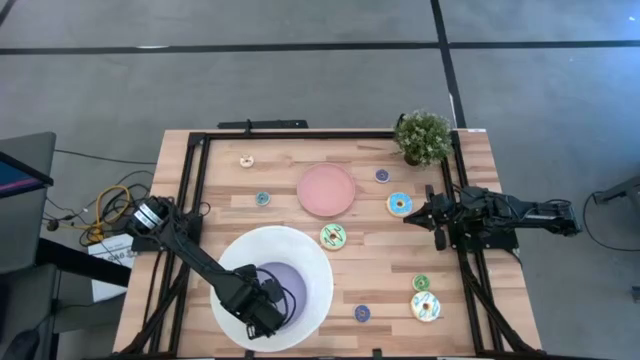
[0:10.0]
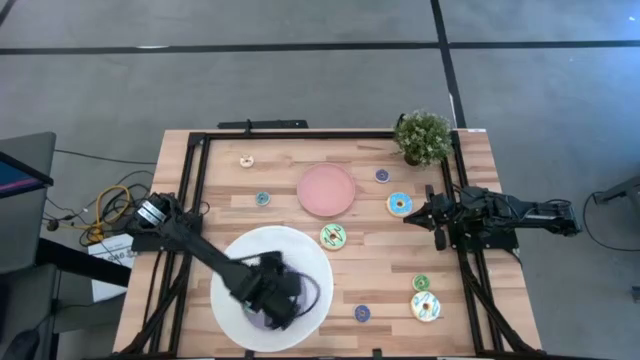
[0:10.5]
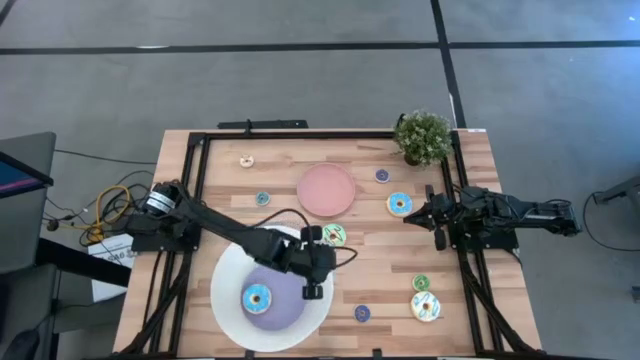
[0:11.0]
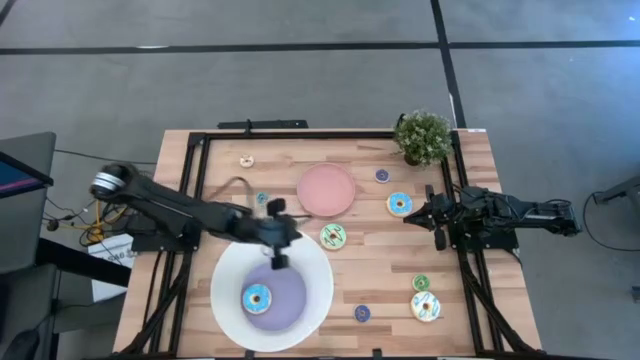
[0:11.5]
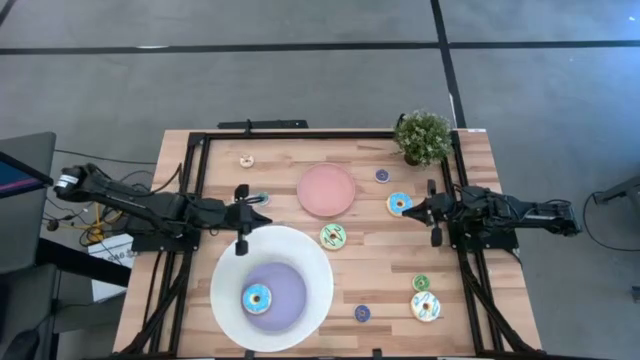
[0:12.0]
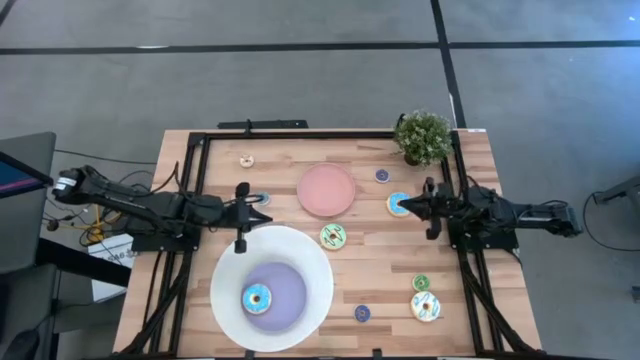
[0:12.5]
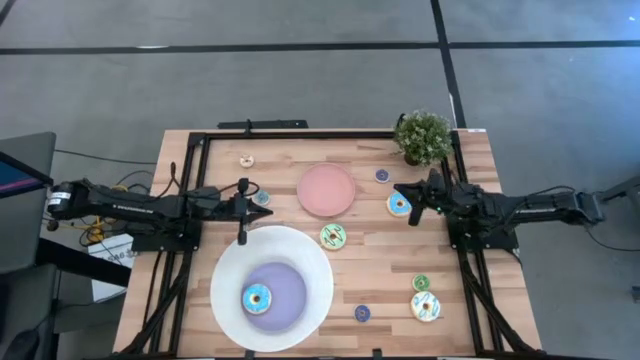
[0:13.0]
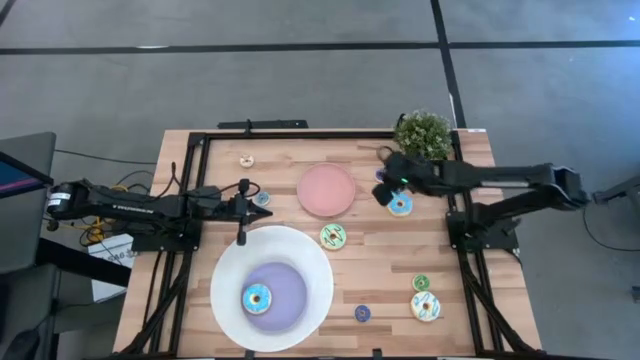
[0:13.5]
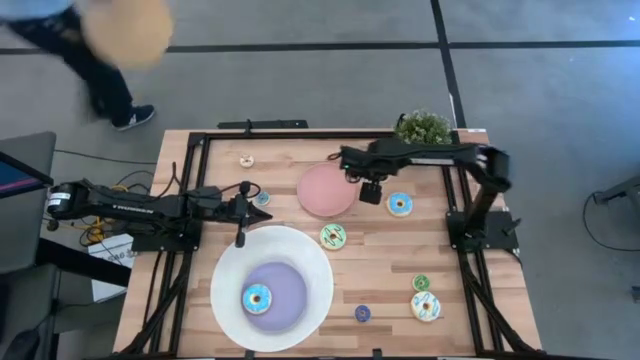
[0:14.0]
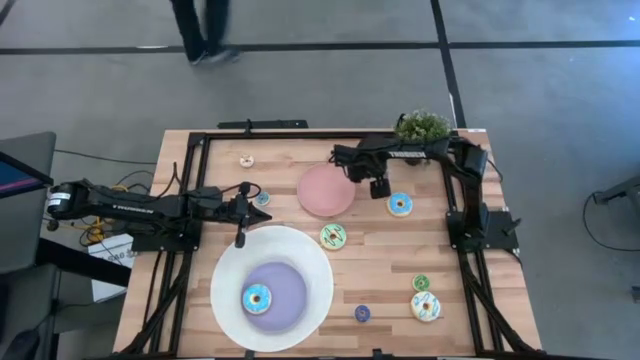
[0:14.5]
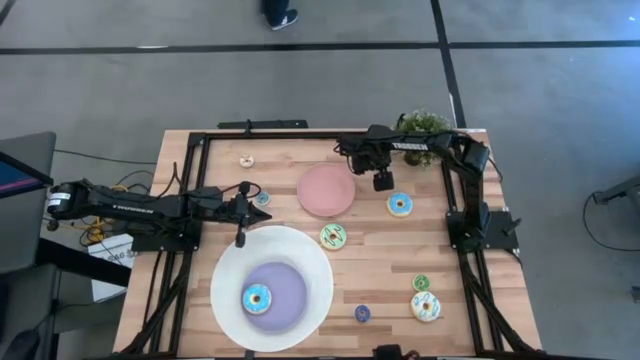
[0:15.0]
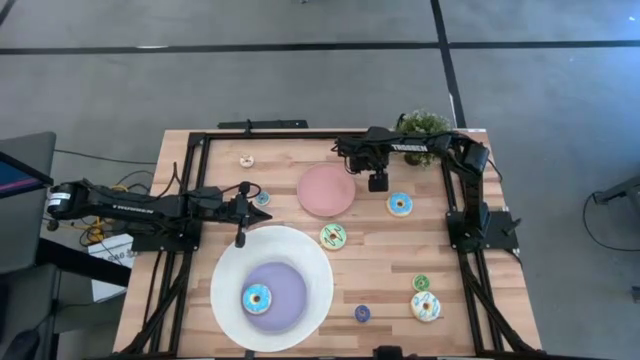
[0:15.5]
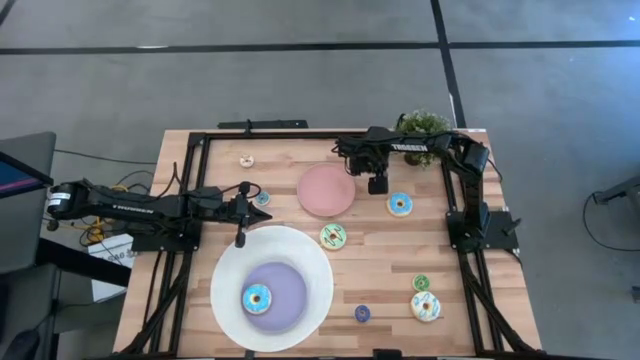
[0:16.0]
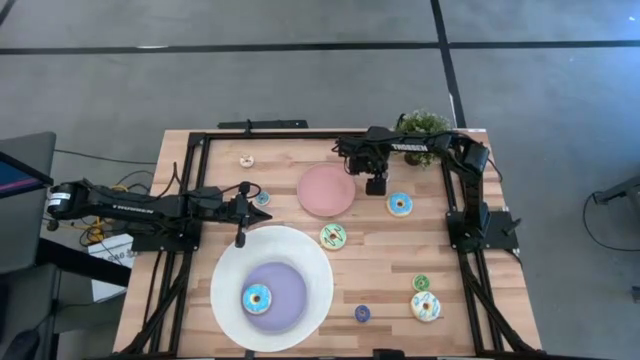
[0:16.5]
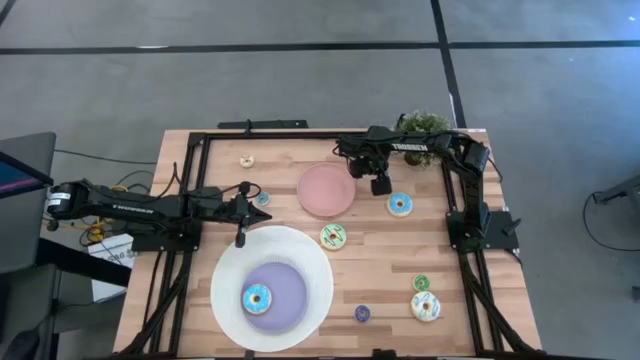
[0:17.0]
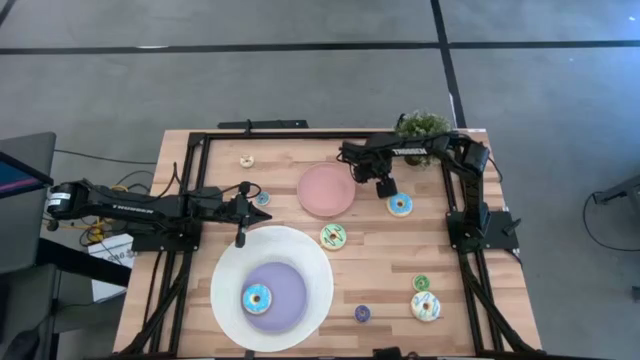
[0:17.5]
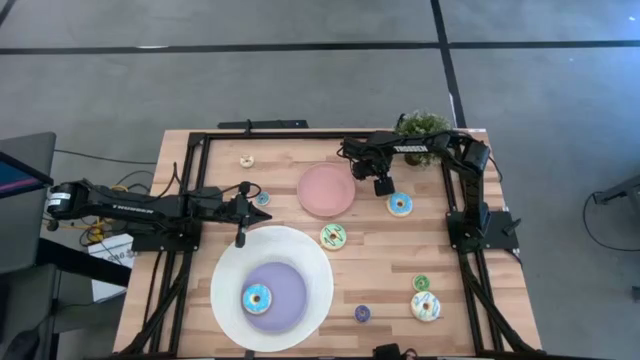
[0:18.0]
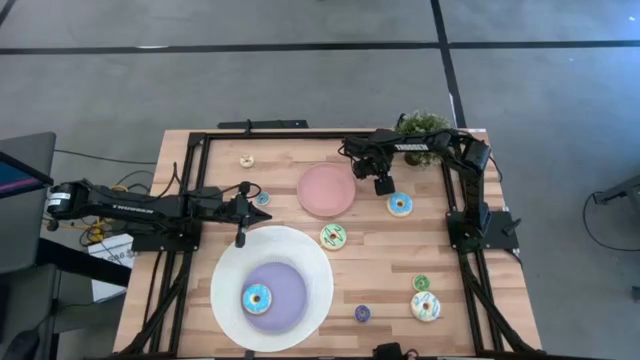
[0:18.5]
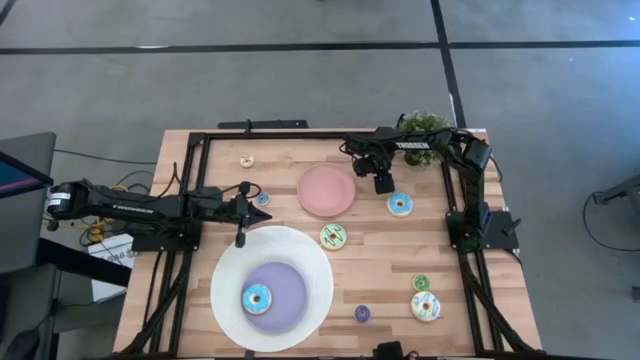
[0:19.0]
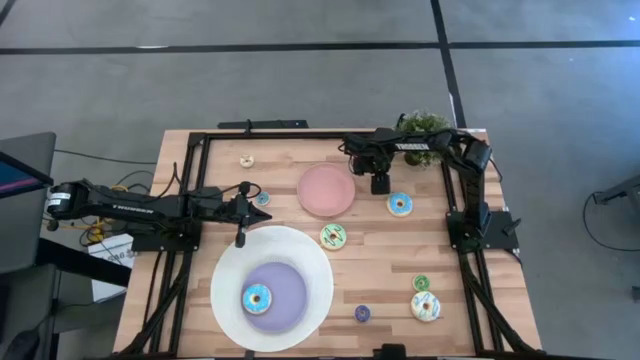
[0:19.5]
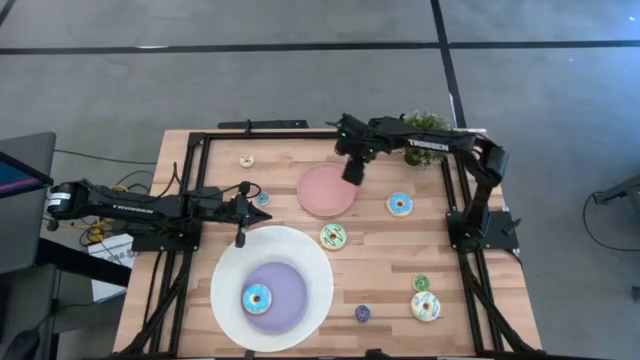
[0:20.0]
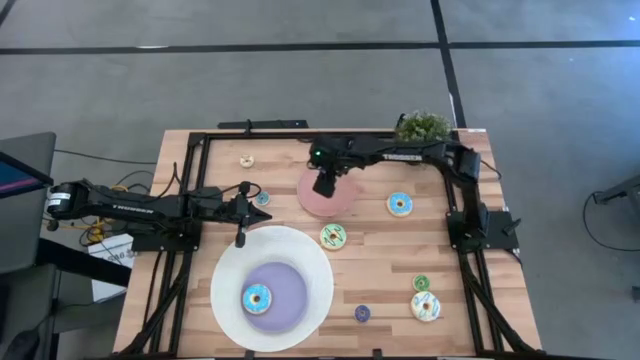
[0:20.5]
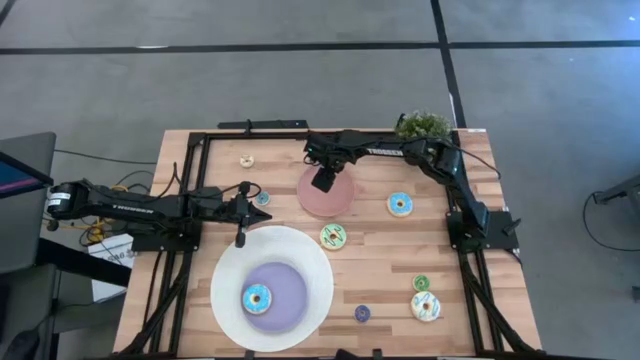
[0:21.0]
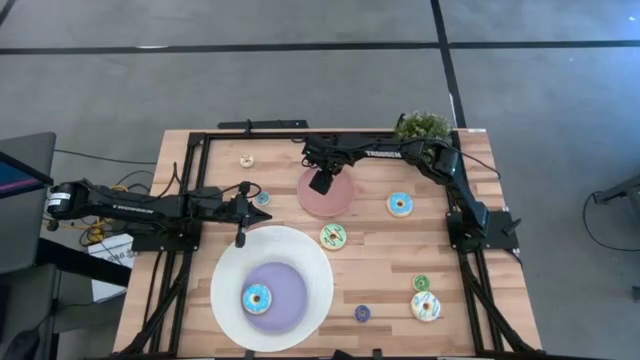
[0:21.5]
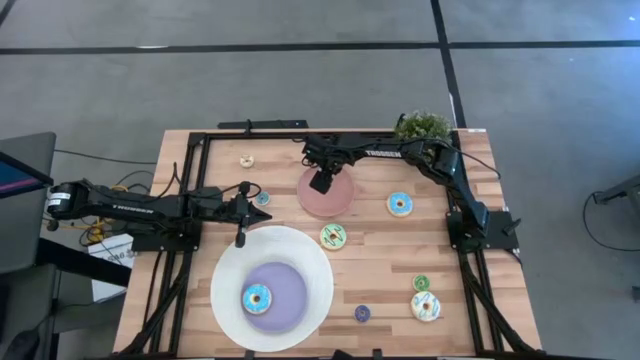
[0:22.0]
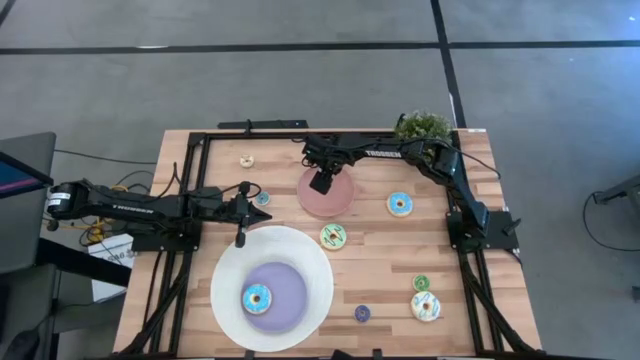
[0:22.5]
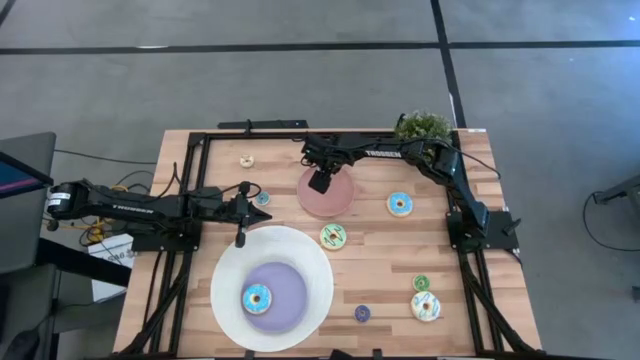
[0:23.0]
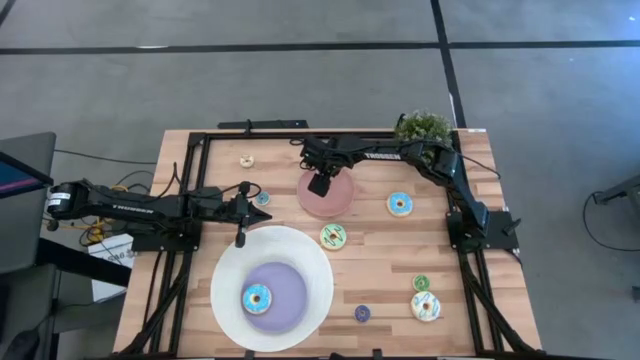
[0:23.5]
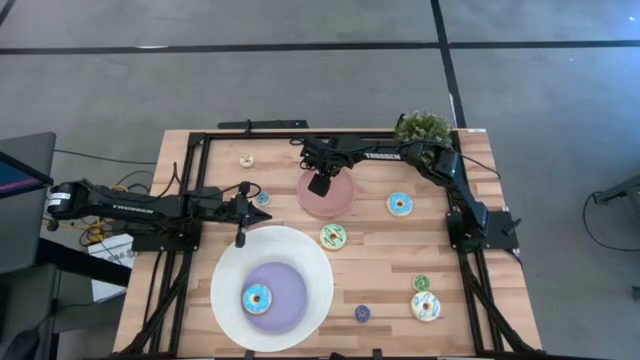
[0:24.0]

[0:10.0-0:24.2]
Task: Pick & Place donuts
Put the small top blue donut on the pink plate

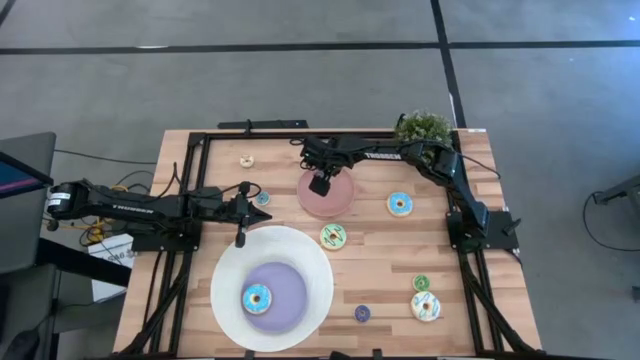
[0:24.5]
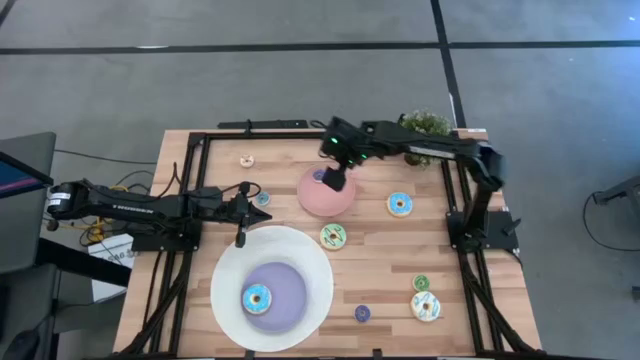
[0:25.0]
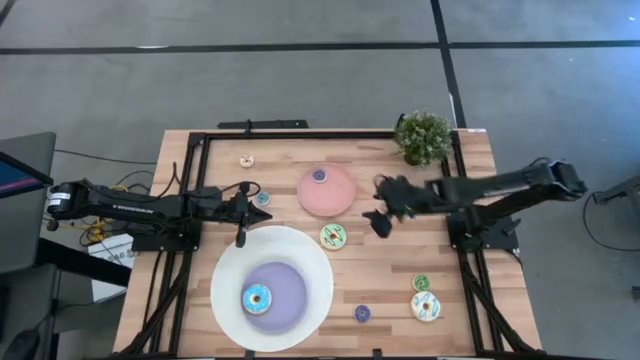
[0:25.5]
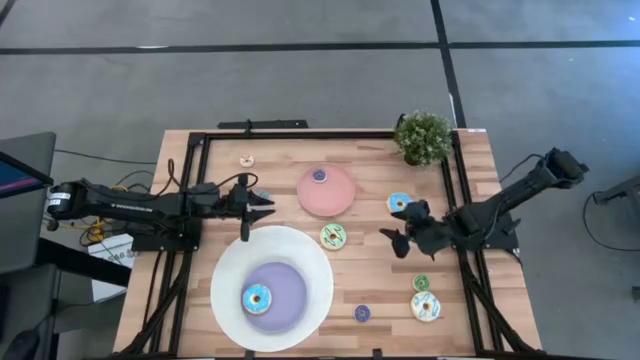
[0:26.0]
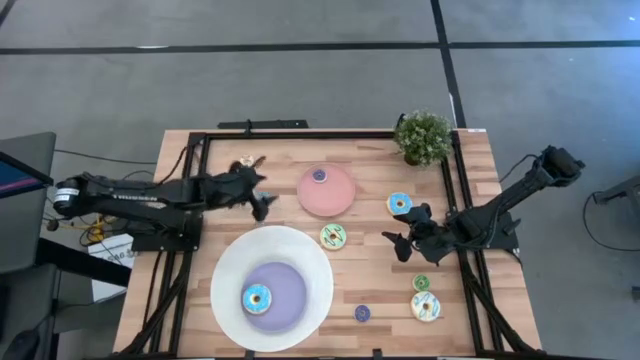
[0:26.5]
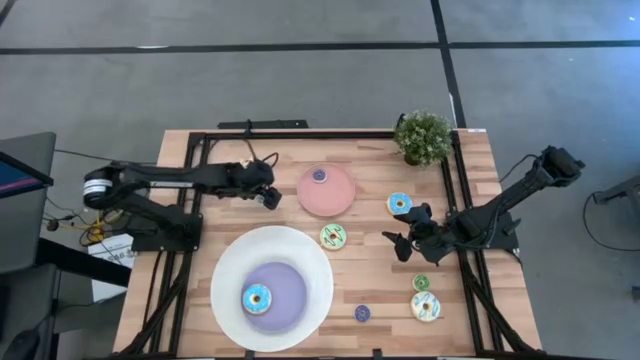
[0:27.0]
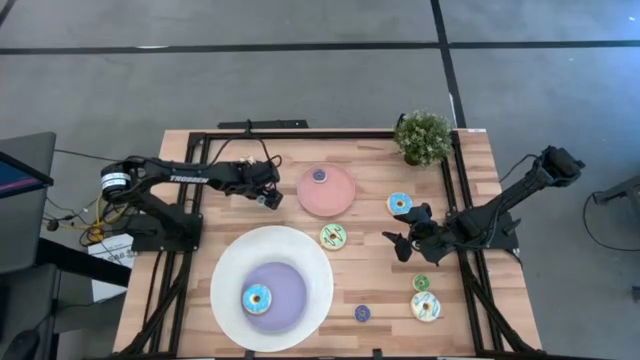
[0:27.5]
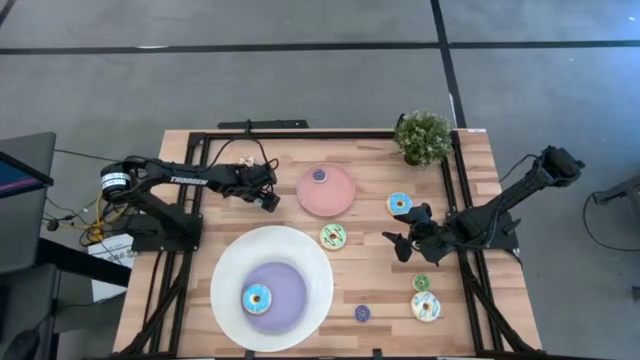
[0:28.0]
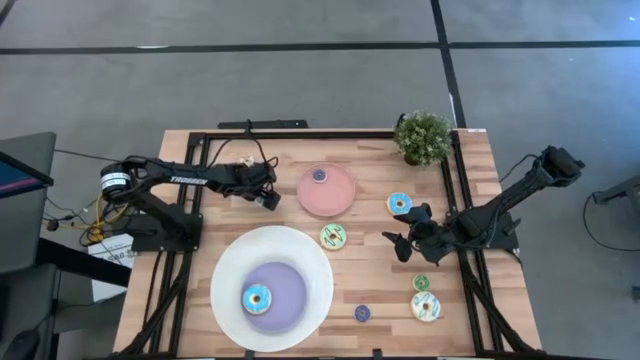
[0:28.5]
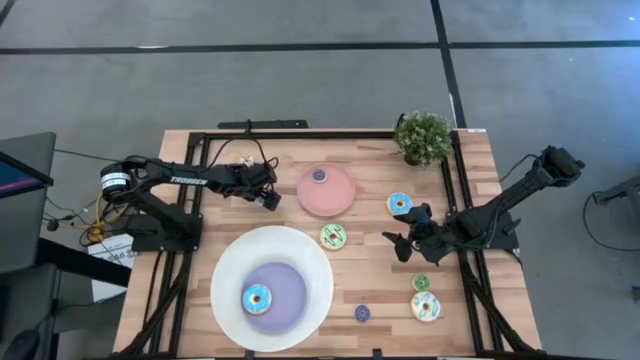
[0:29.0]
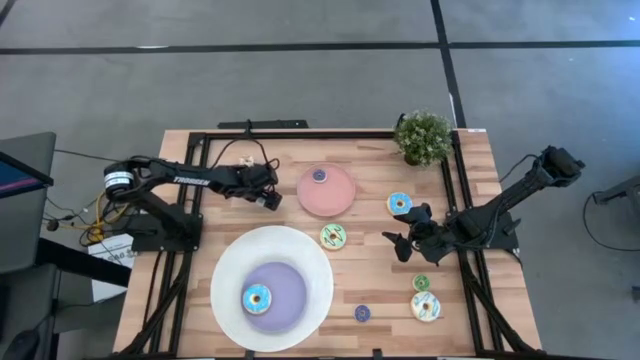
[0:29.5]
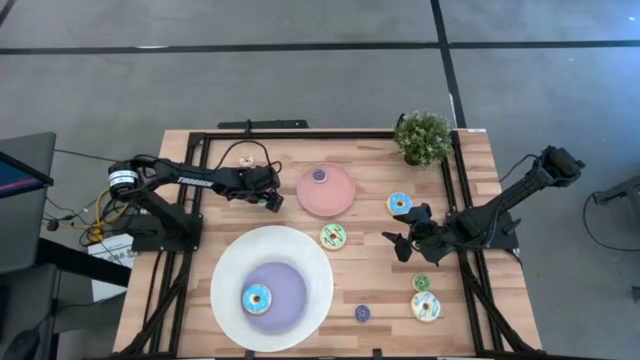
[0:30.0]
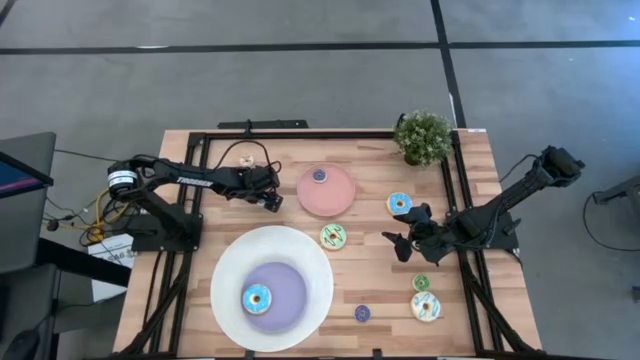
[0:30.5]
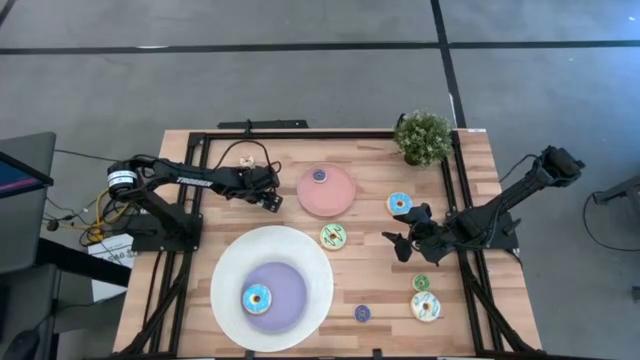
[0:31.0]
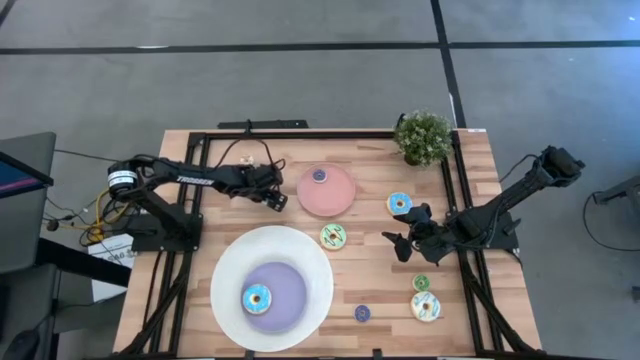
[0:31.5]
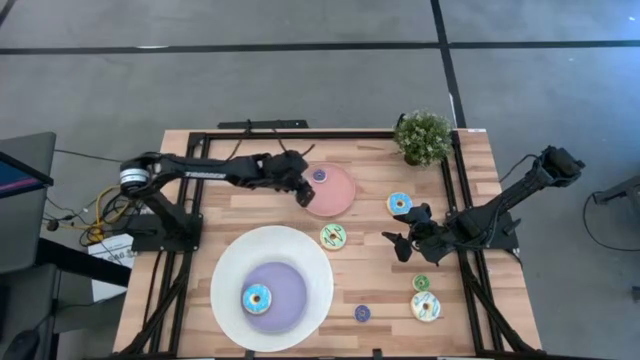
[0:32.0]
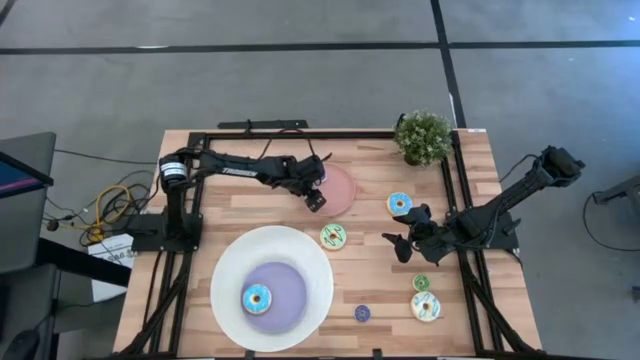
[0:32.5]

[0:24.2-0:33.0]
Put the small light blue donut on the pink plate
